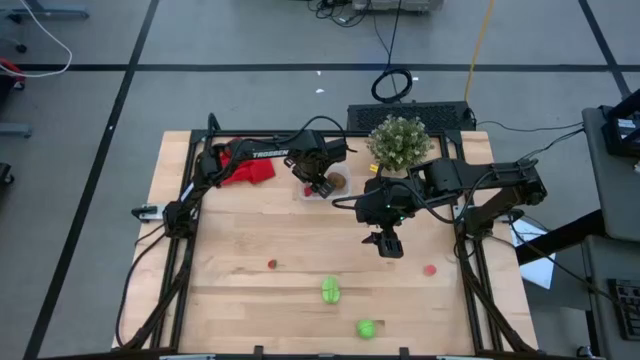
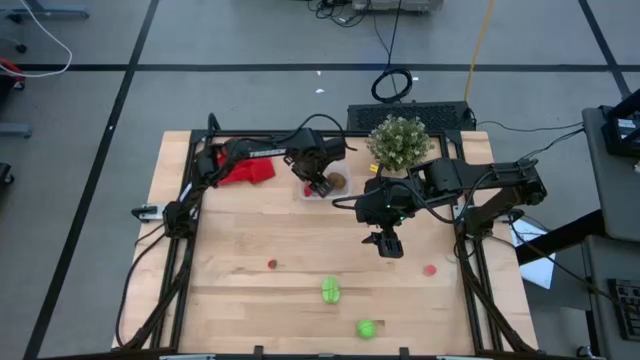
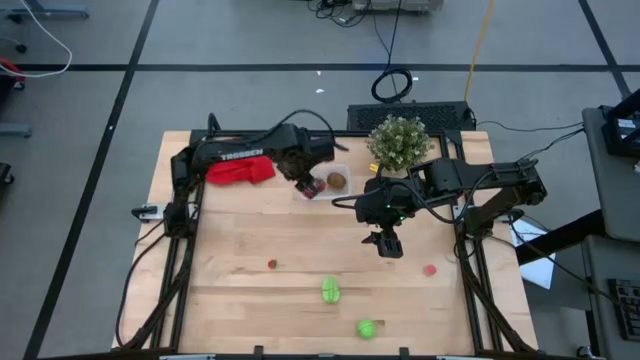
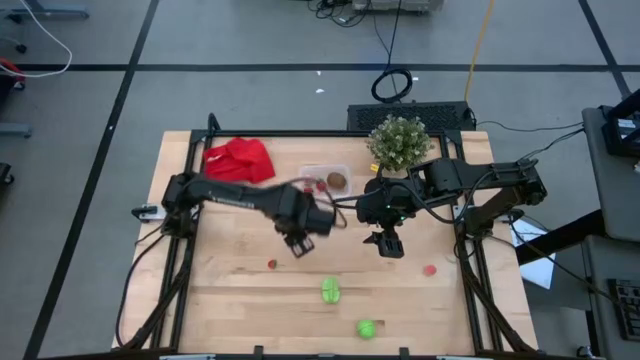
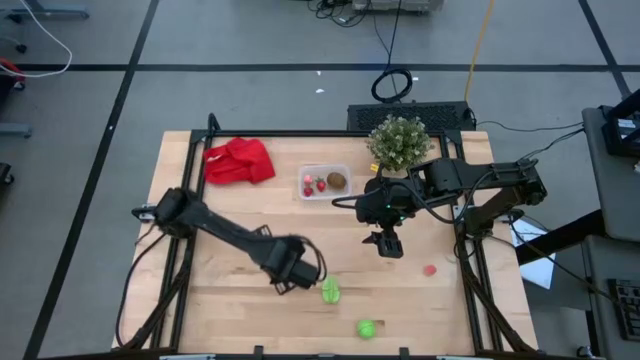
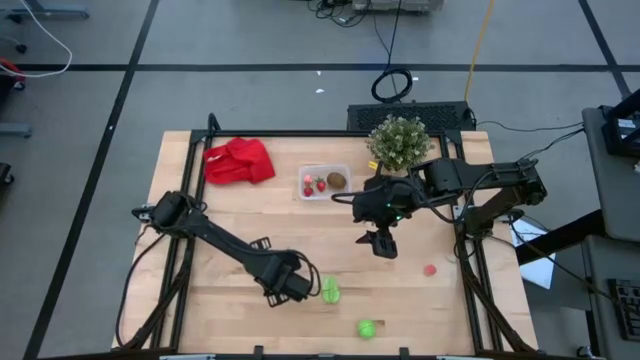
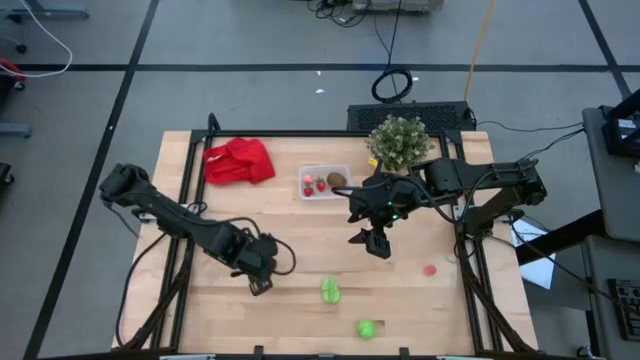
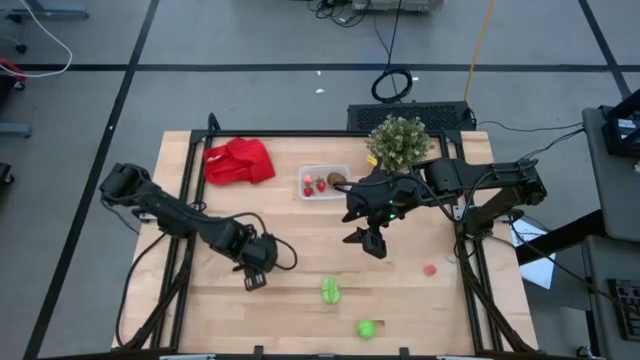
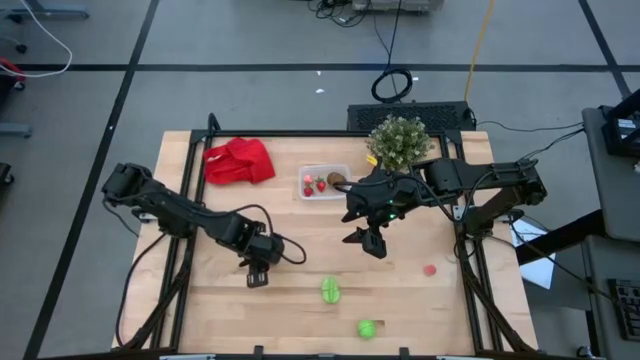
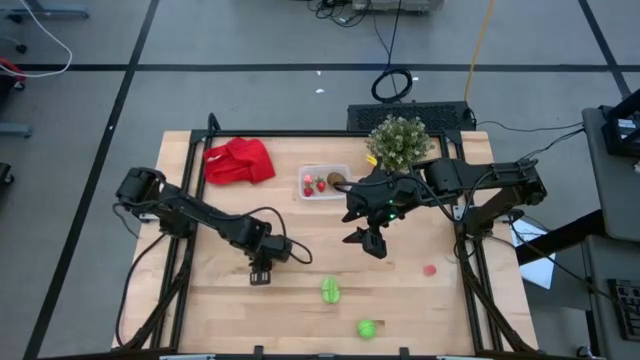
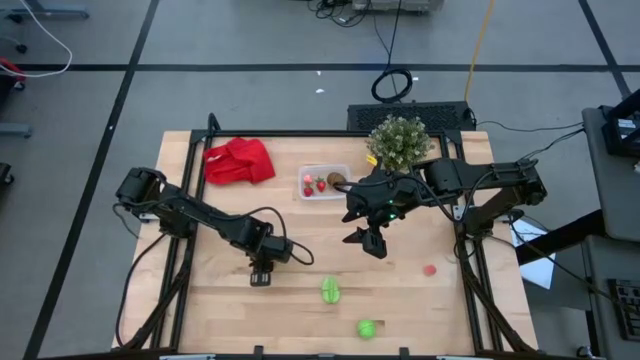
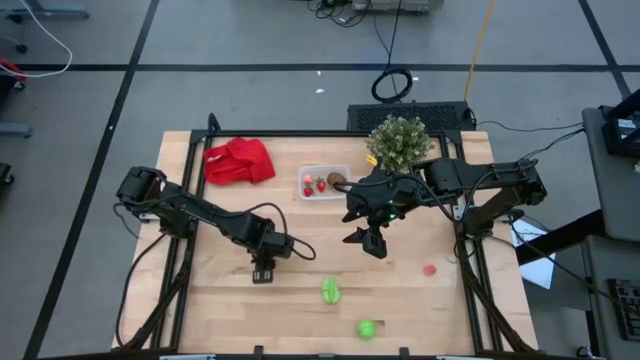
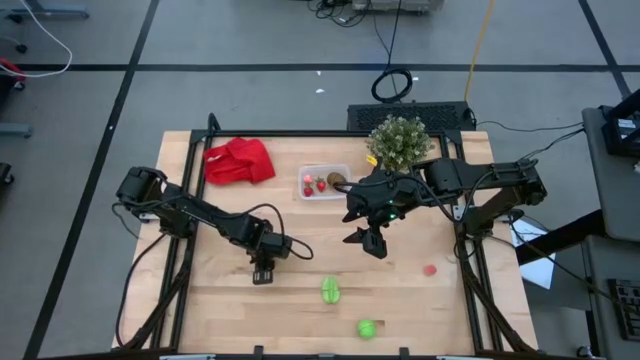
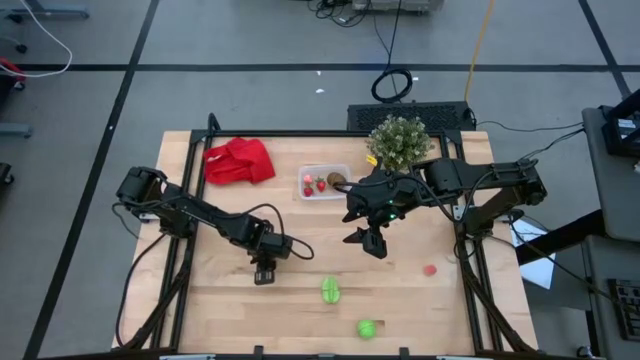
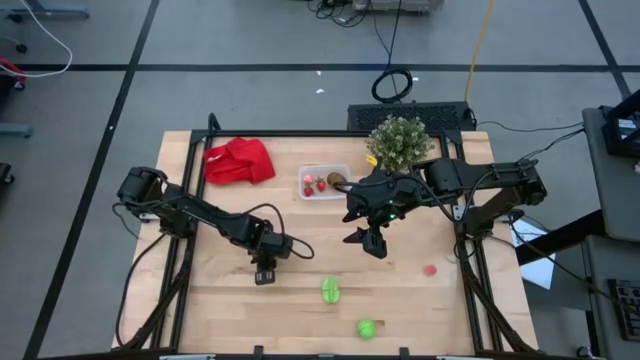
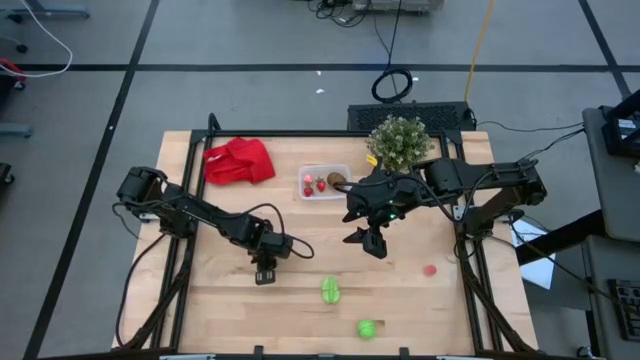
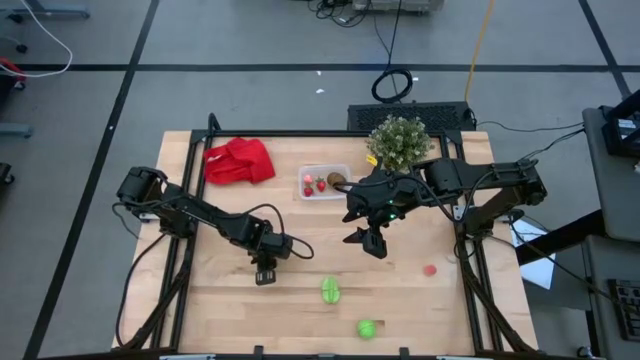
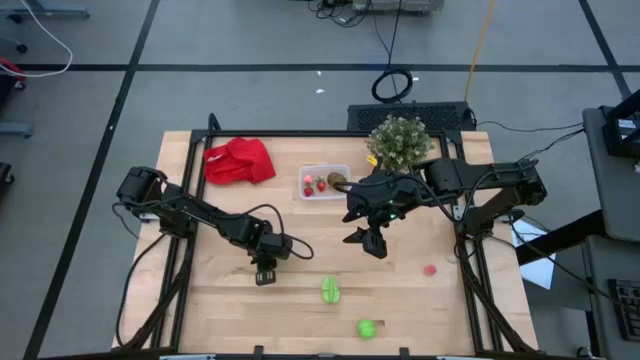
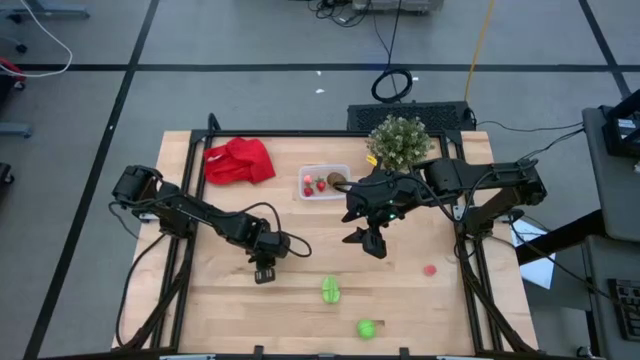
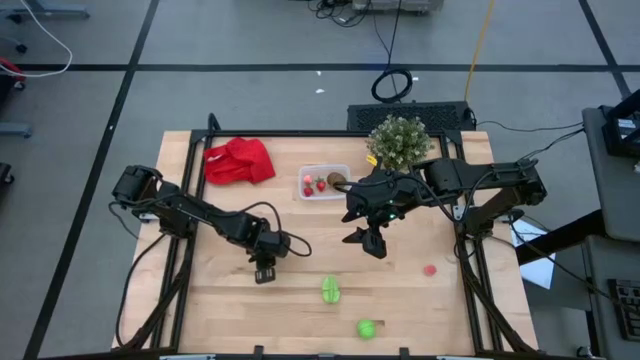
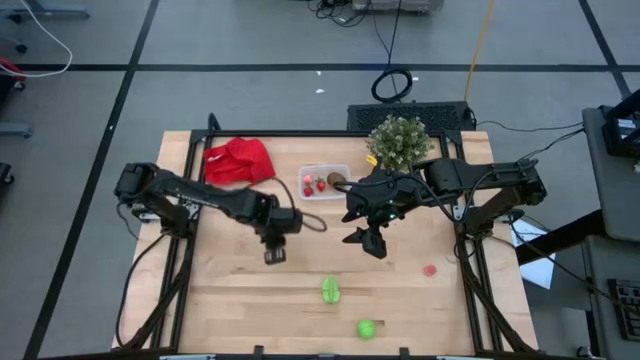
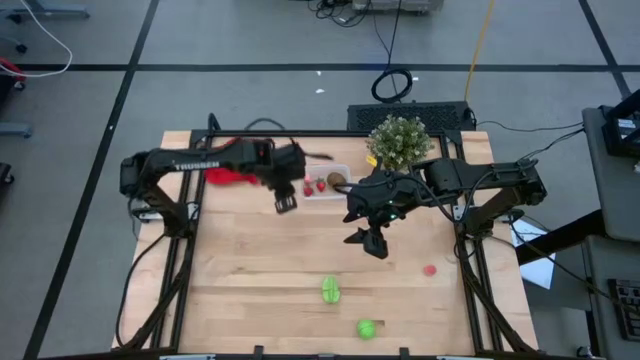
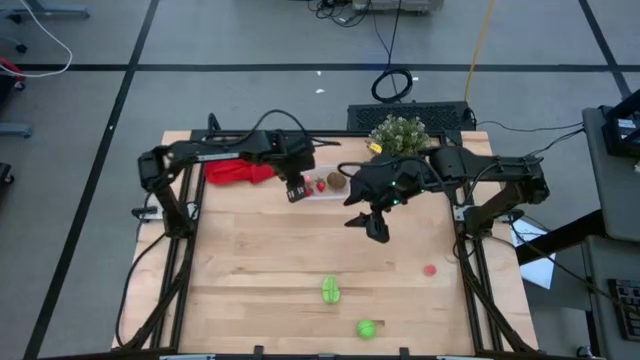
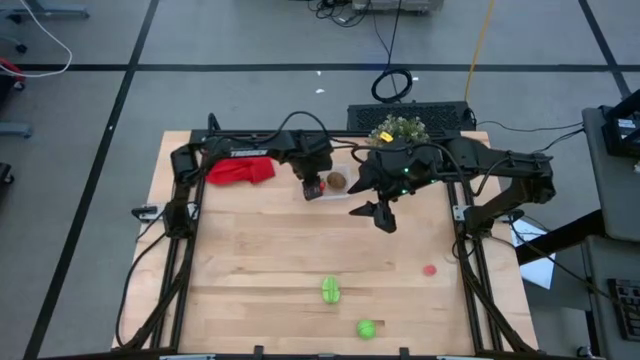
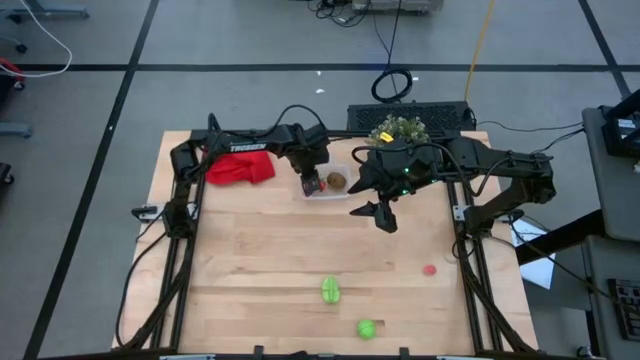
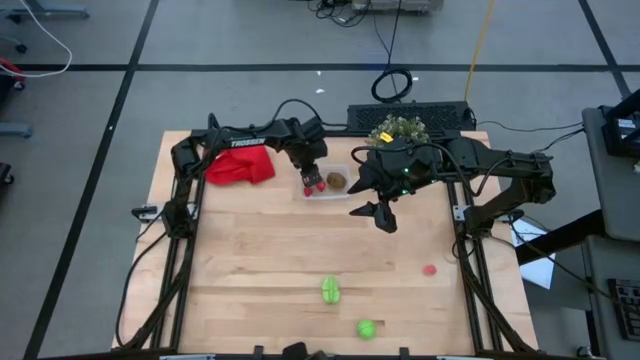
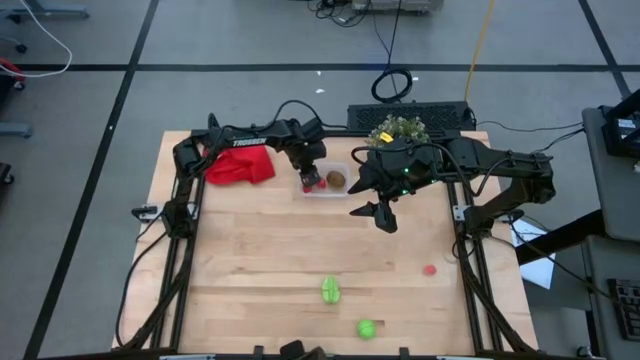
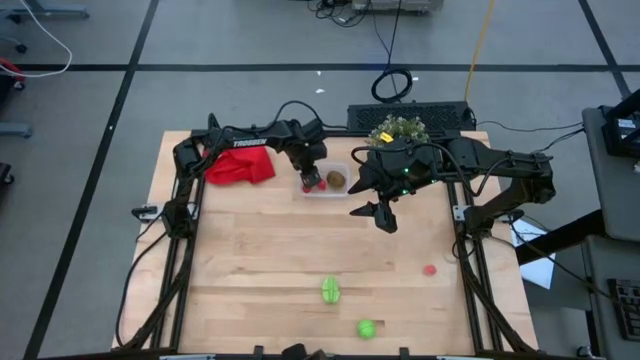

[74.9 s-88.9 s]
Task: Pick and placing Produce into tupperware
Put the strawberry into the bin

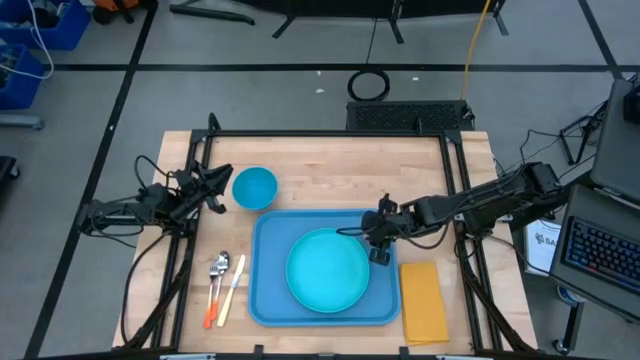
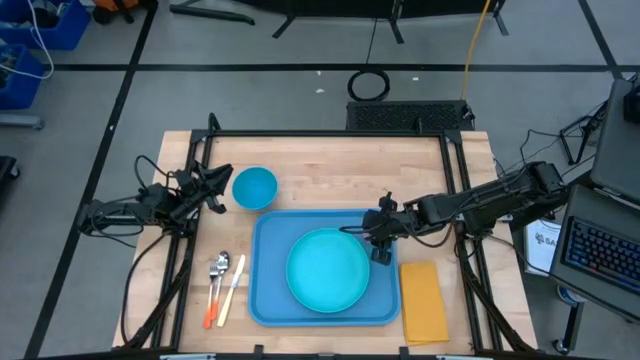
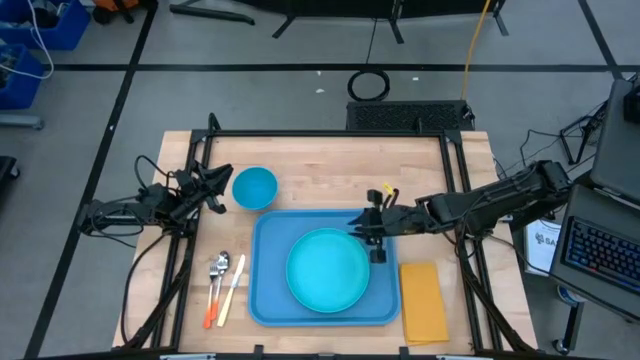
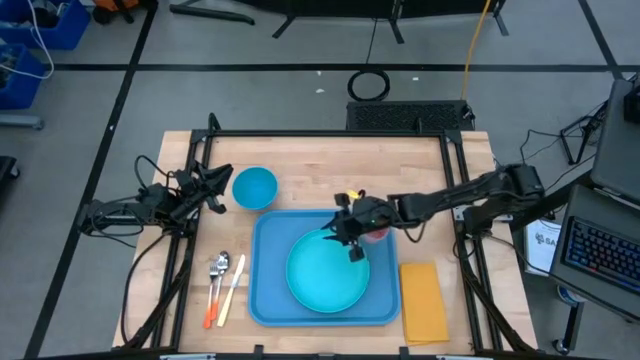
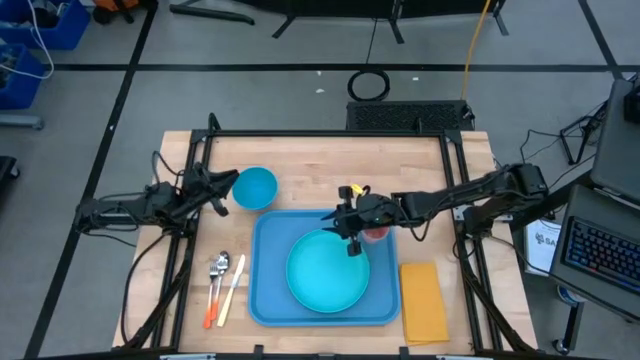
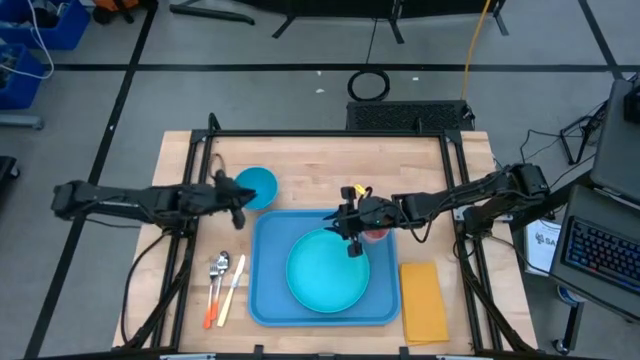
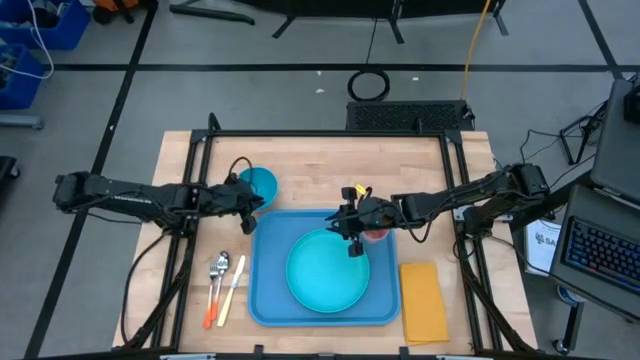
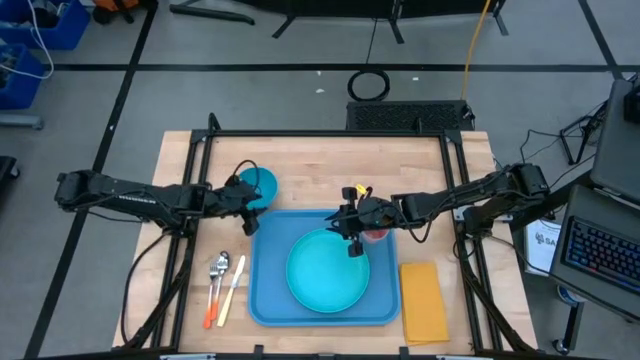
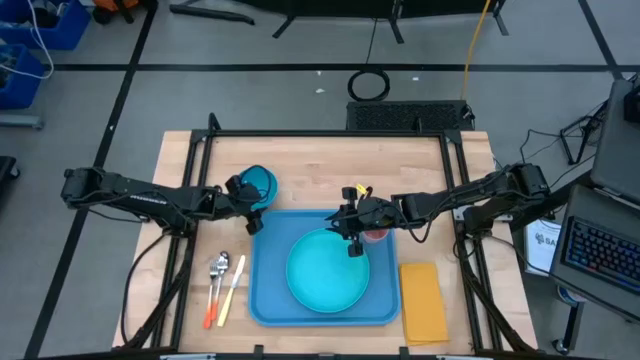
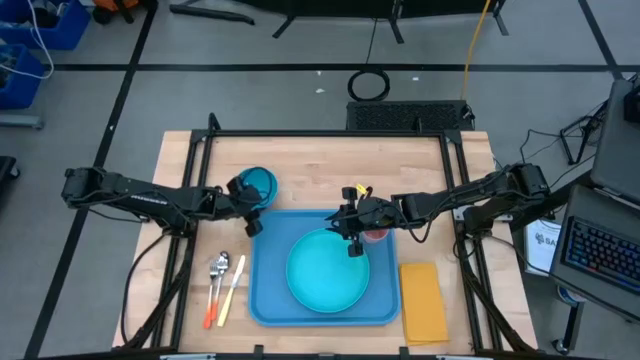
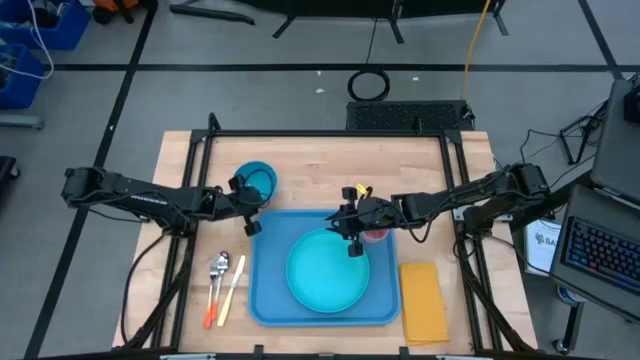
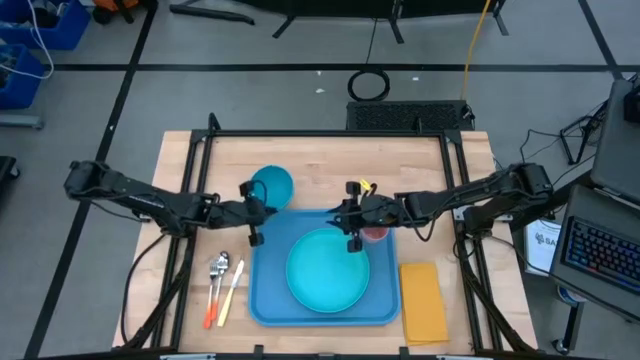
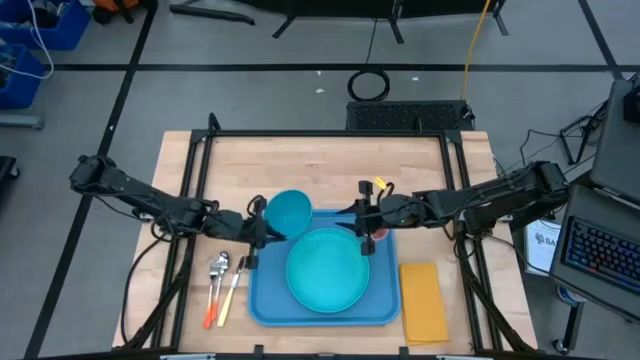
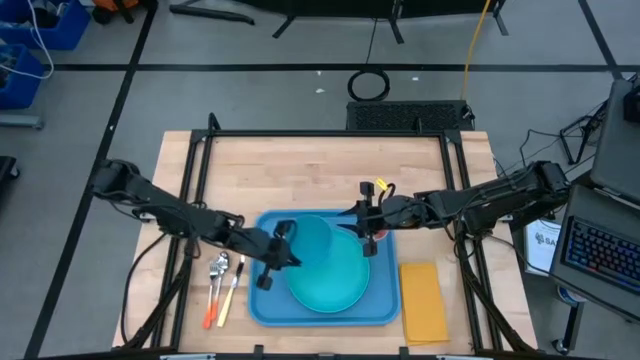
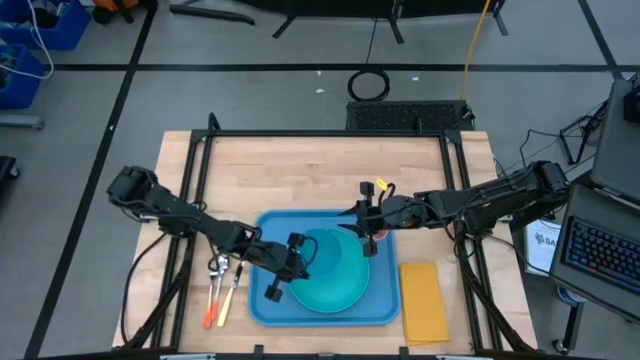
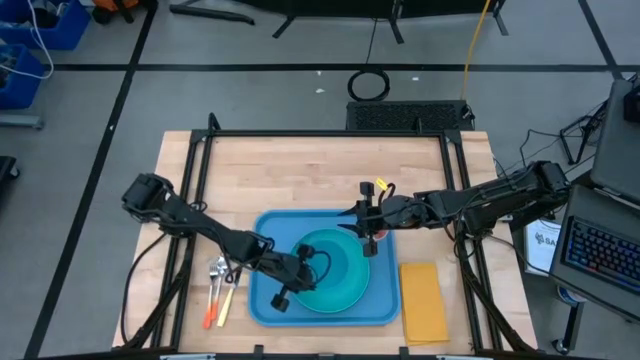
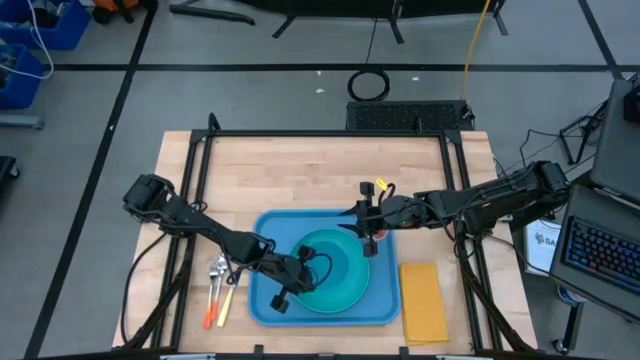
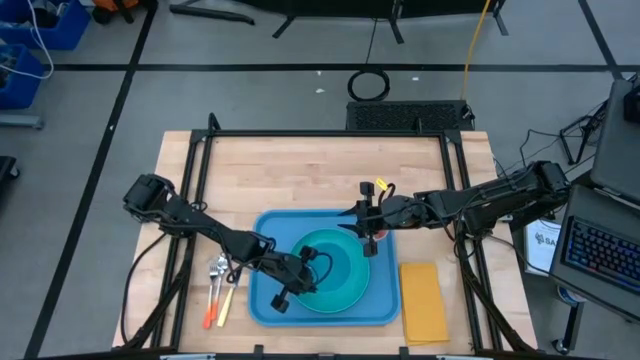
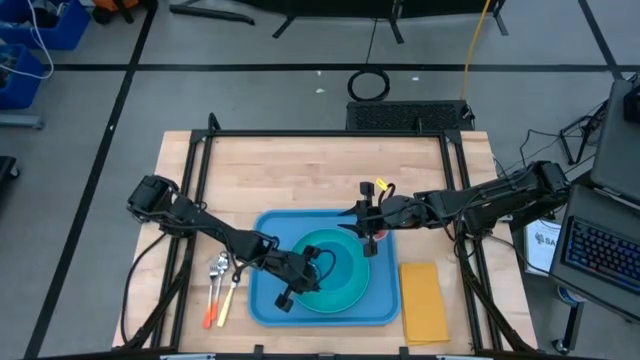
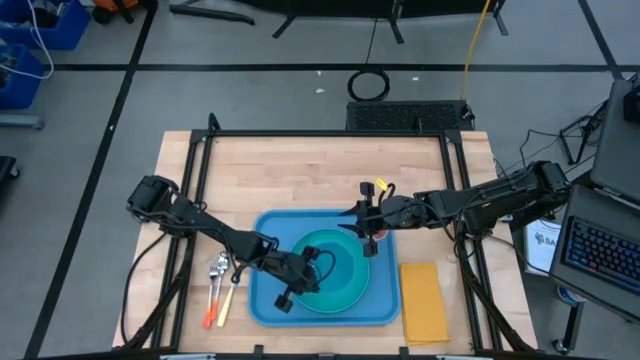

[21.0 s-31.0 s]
Task: Set up tray
Put the blue bowl on top of the green plate in the blue serving tray
